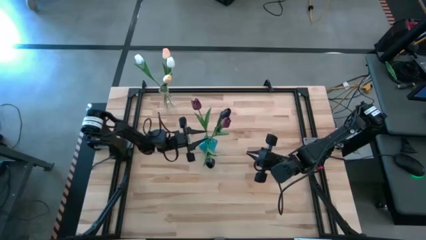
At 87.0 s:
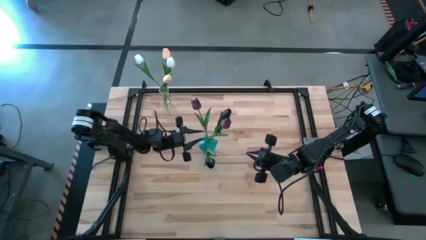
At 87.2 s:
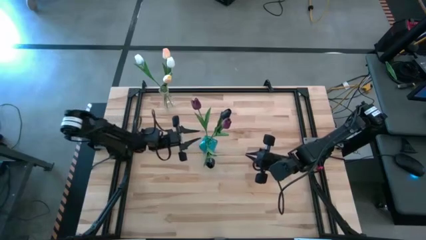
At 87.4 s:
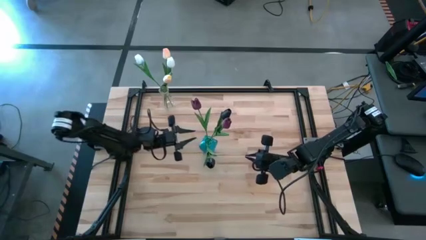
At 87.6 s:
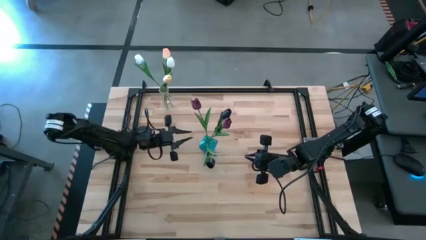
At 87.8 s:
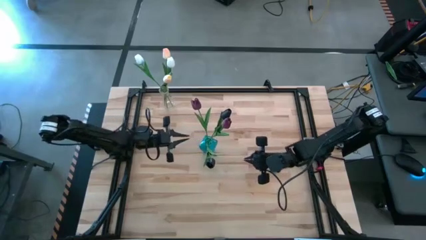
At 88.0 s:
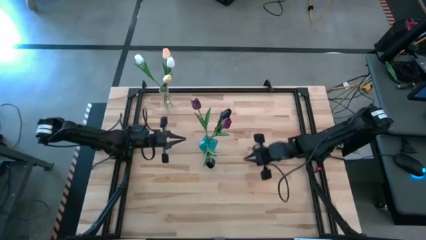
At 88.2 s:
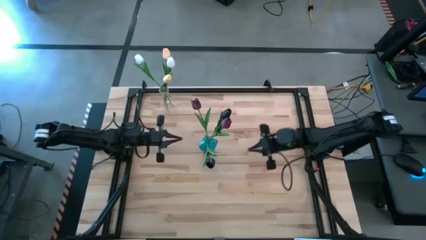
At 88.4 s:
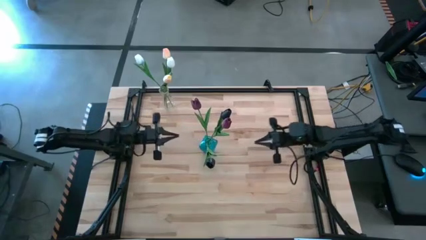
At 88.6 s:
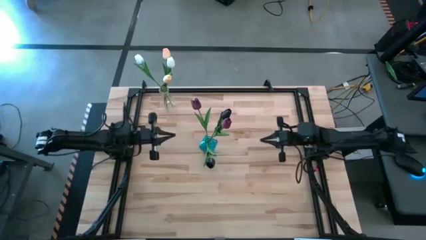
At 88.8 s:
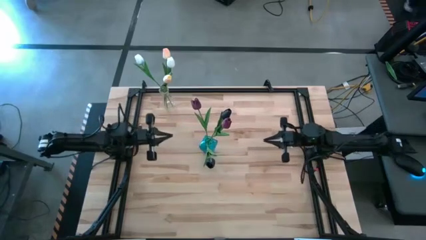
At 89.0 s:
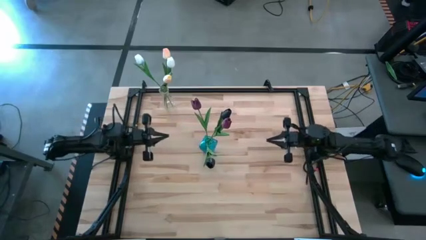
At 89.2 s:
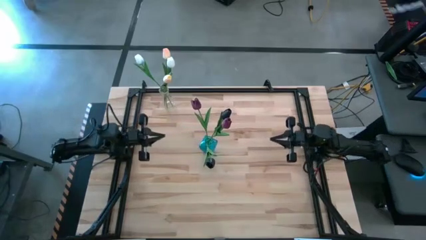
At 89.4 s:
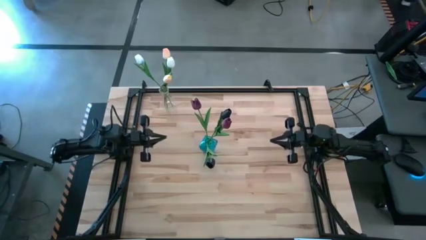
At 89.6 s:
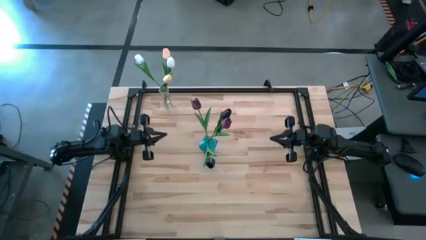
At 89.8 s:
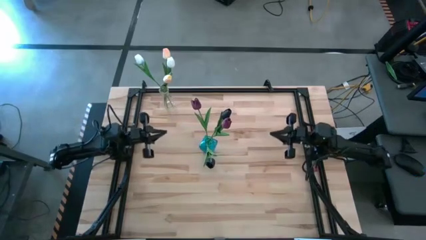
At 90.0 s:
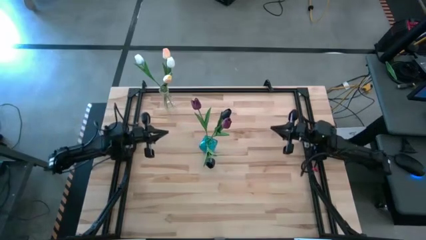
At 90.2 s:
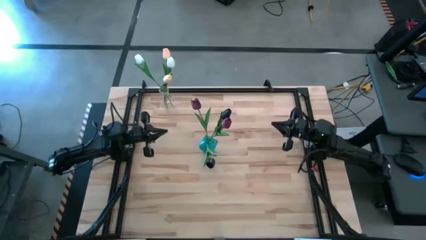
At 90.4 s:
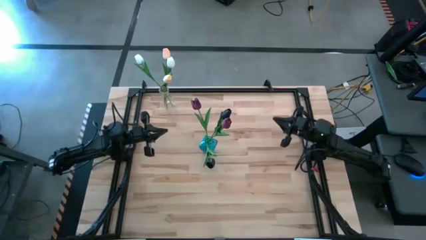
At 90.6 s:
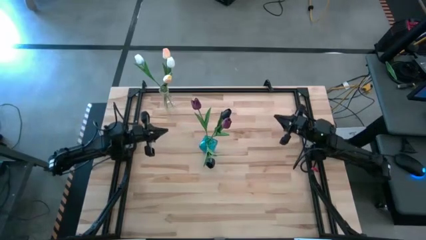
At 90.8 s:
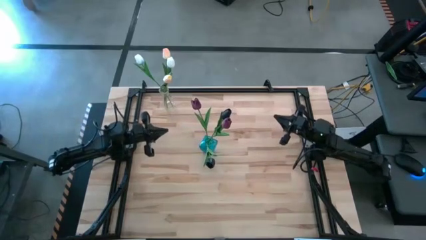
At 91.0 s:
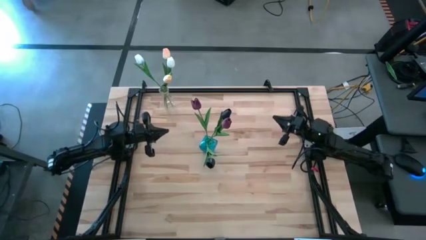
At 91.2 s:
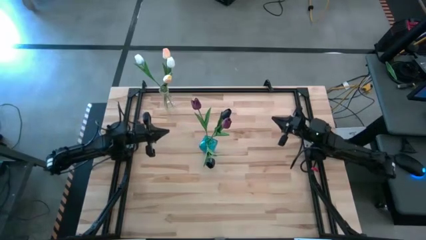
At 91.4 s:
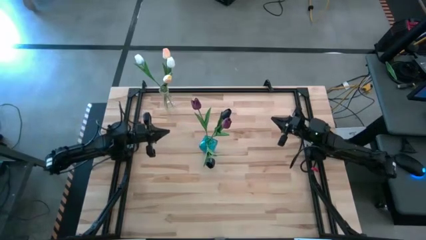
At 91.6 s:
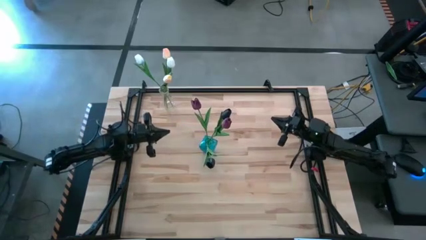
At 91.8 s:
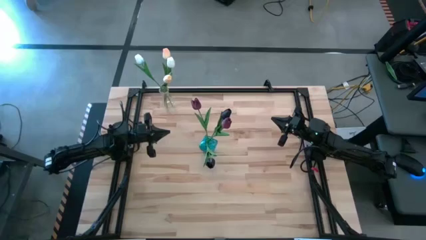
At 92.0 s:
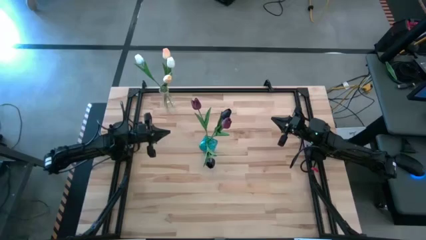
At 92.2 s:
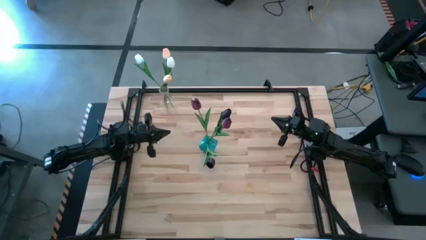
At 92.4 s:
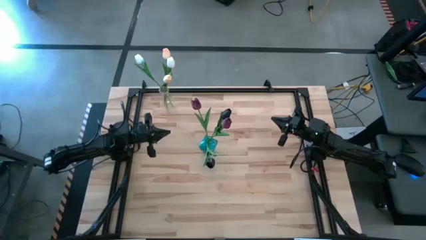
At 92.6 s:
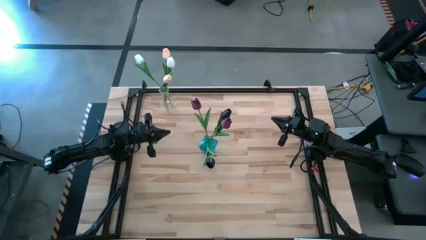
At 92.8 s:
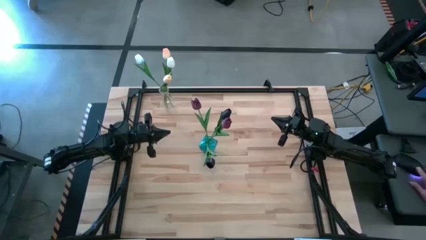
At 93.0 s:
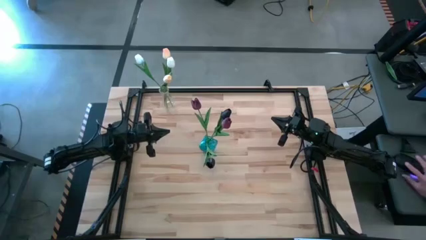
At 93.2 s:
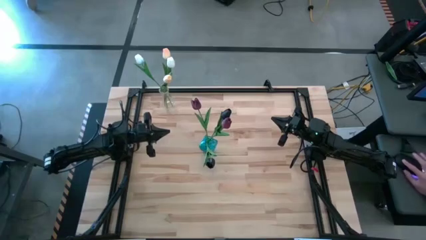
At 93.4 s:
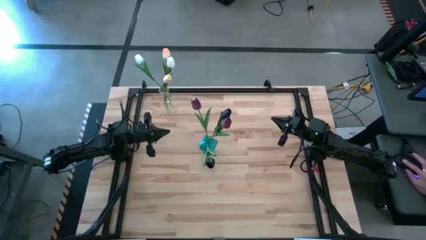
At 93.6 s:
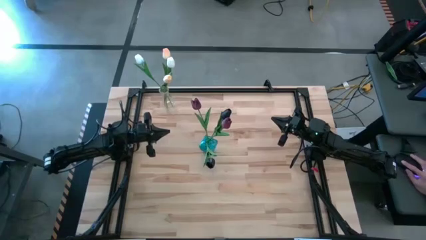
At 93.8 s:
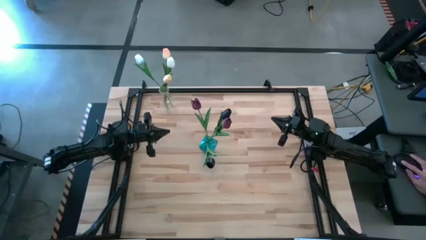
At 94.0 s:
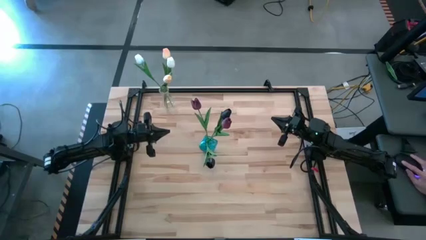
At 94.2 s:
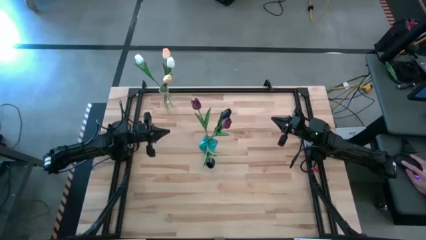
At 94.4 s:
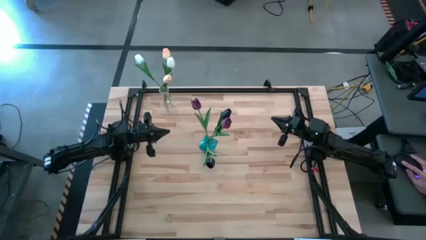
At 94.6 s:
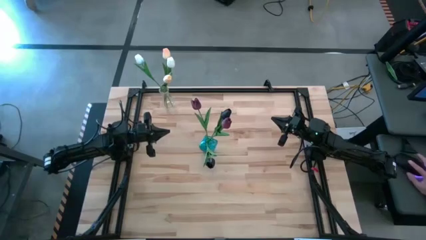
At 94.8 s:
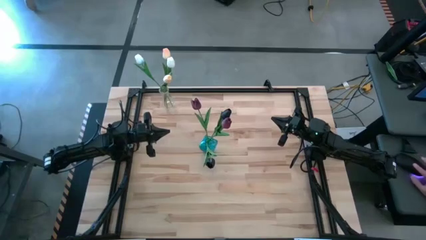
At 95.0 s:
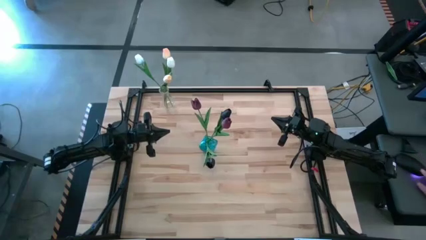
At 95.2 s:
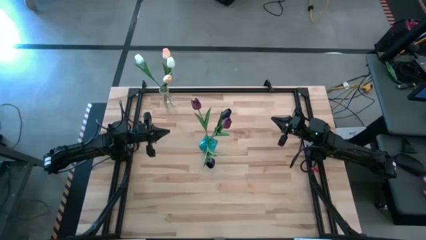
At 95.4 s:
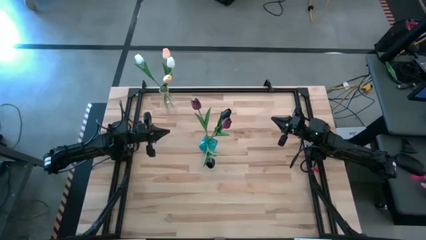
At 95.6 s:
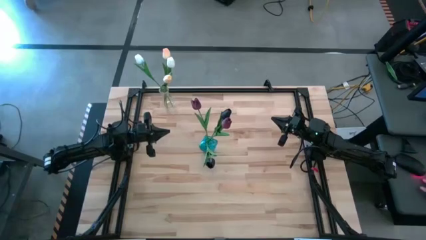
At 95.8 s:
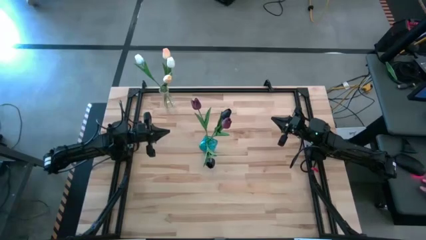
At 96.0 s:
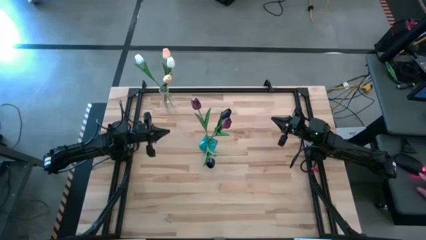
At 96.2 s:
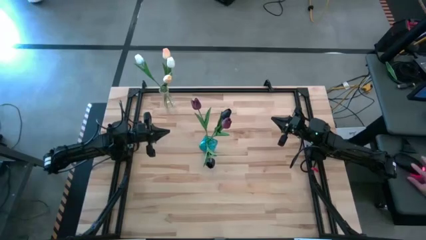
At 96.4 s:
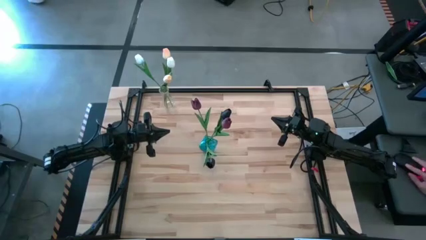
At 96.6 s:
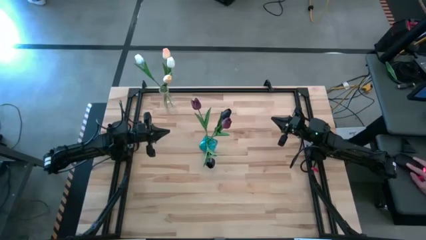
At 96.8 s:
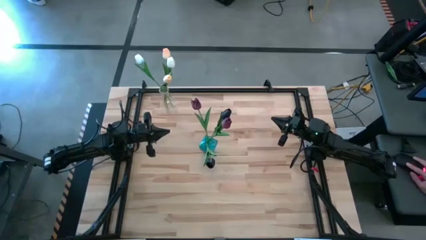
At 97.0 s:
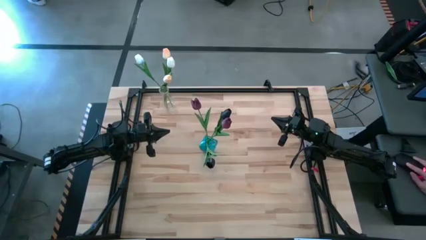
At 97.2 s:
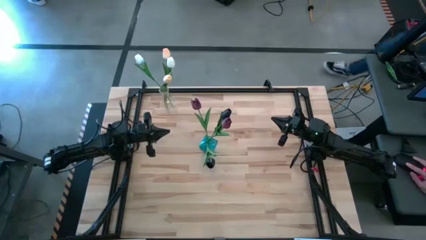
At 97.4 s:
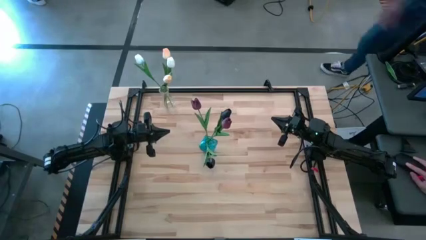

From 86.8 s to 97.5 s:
Task: Sort flowers into vase by color
Return to Home Position

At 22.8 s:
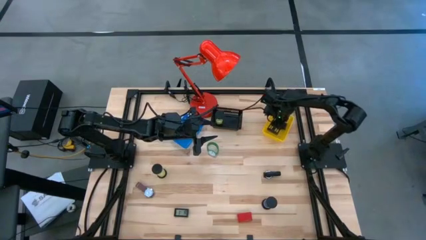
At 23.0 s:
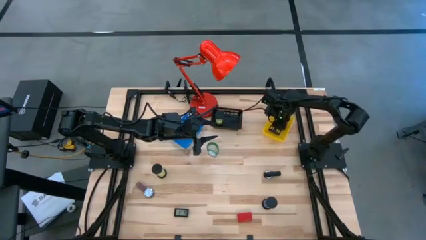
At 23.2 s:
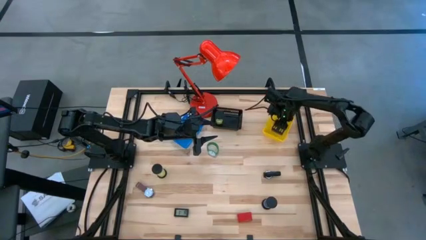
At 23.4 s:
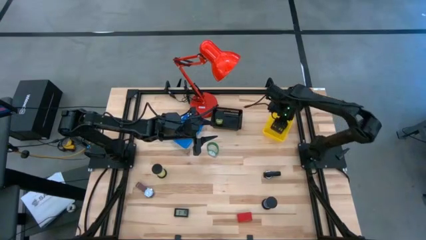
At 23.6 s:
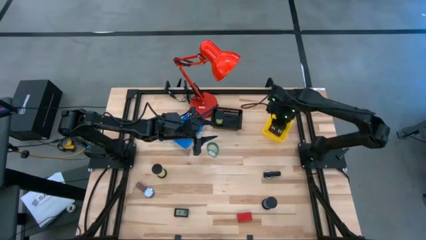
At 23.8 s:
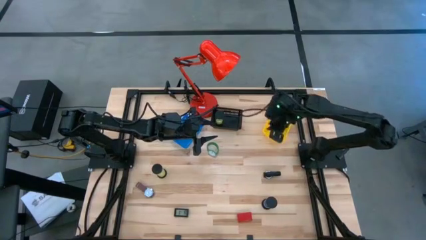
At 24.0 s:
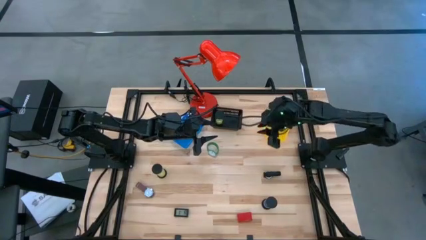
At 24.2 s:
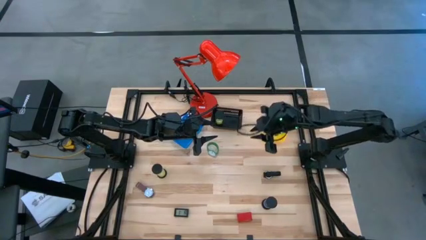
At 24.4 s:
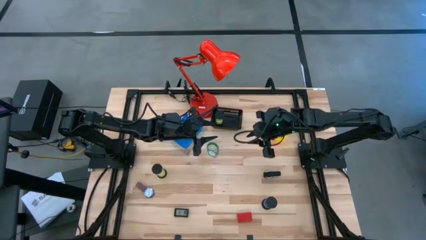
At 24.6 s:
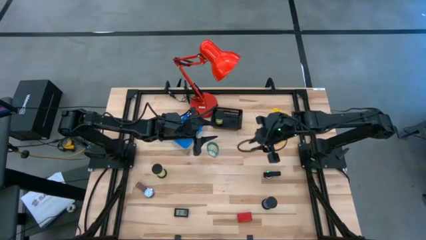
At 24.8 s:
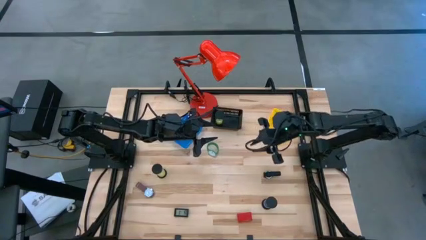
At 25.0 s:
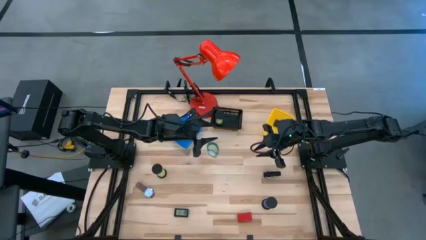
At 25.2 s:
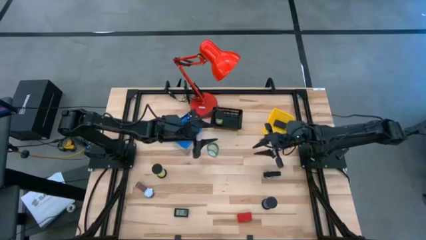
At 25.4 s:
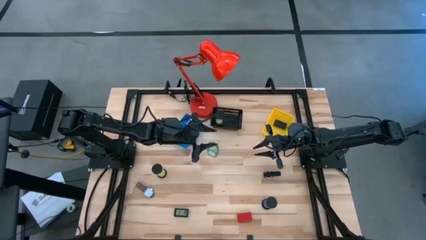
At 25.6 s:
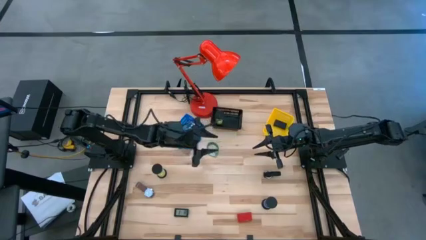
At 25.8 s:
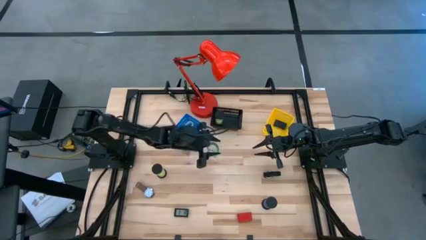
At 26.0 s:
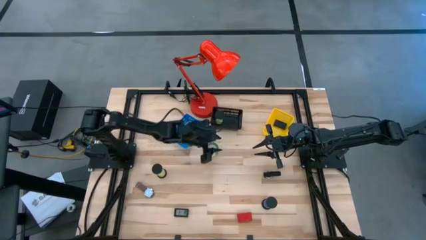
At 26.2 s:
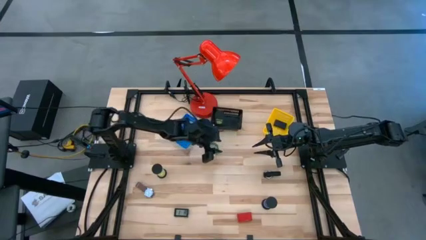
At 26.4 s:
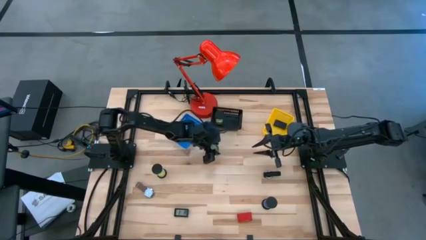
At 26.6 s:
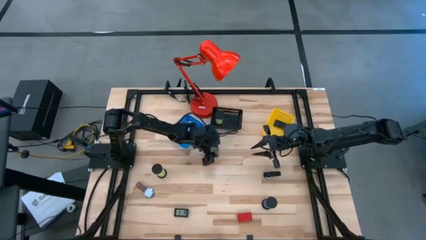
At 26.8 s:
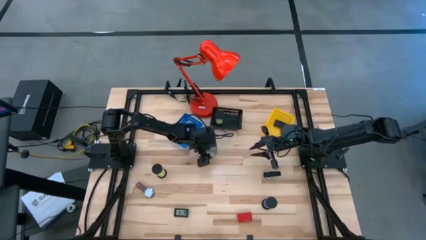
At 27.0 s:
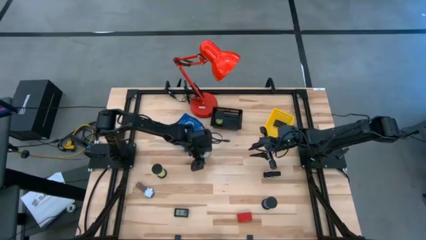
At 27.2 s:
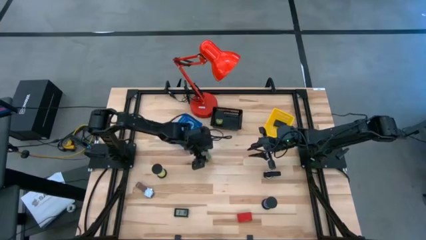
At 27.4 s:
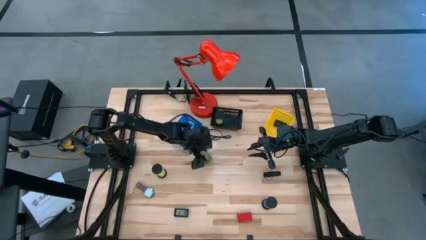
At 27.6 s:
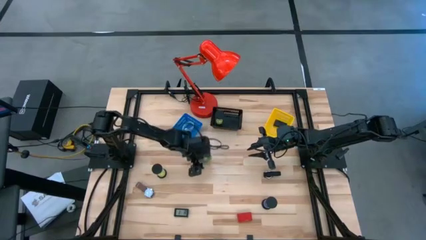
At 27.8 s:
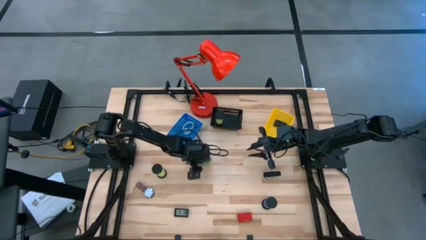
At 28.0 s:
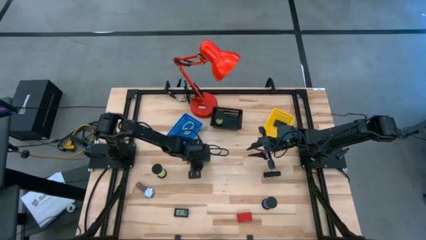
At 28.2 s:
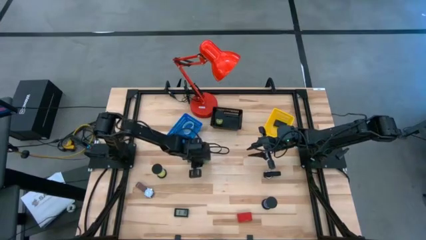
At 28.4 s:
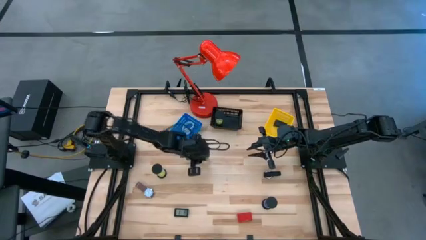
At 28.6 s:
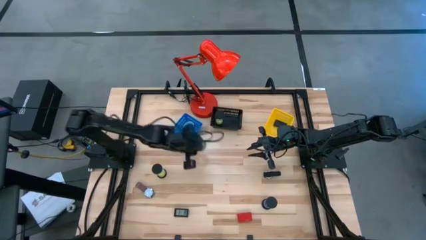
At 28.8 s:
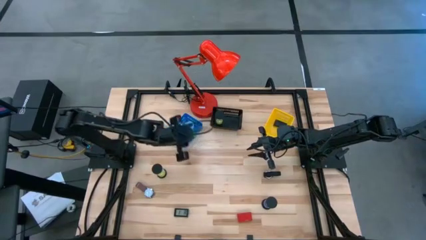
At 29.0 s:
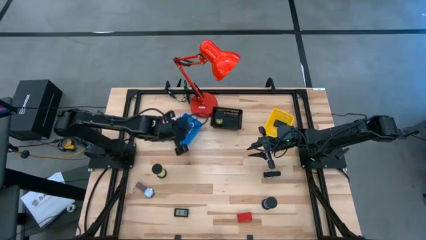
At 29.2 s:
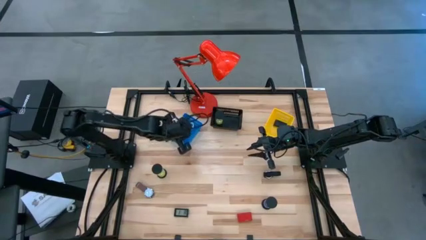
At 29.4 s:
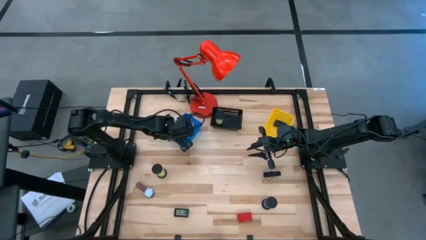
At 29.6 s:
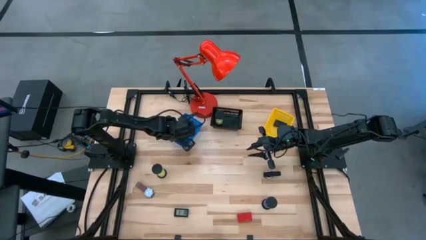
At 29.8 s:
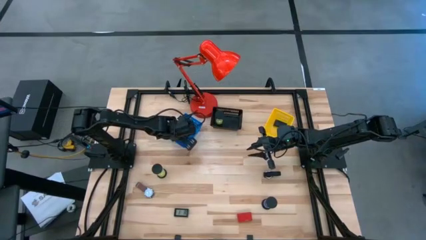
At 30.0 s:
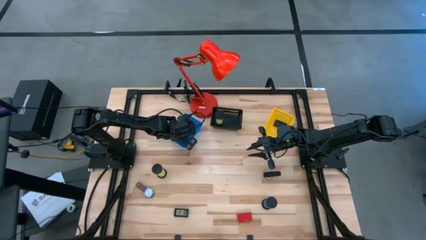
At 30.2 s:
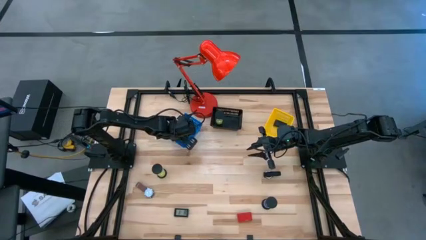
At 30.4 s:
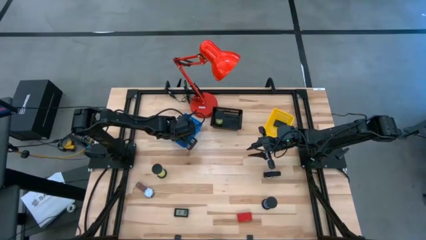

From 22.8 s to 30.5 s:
Task: Pick & Place Office items
Put the green watch into the blue bin
